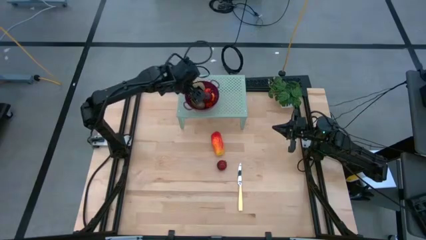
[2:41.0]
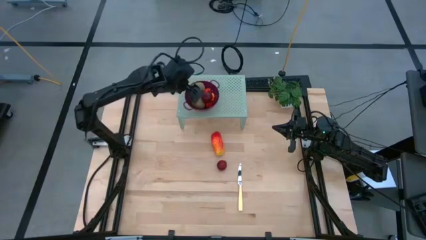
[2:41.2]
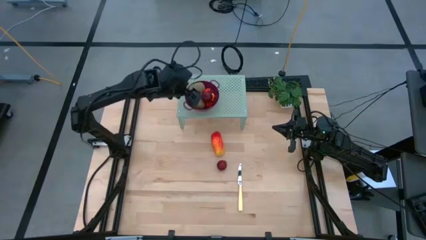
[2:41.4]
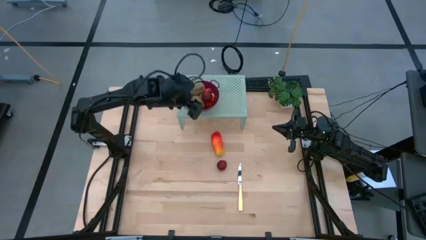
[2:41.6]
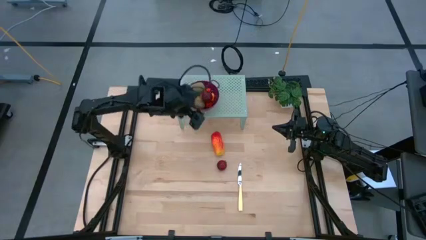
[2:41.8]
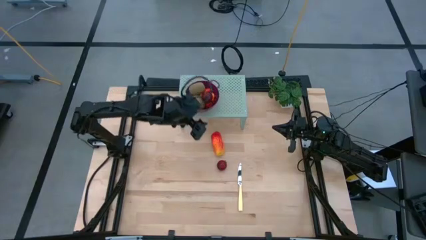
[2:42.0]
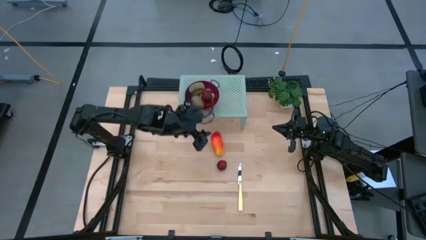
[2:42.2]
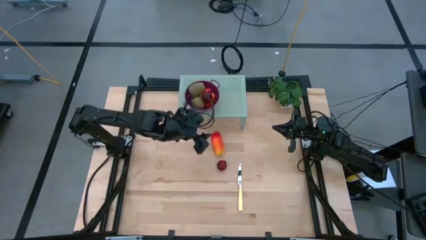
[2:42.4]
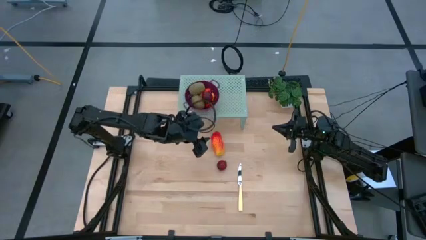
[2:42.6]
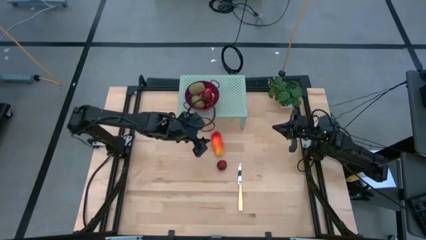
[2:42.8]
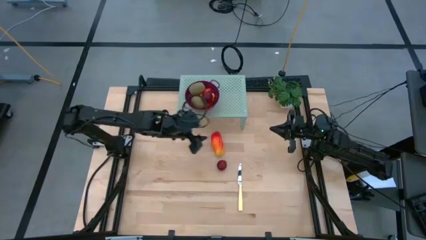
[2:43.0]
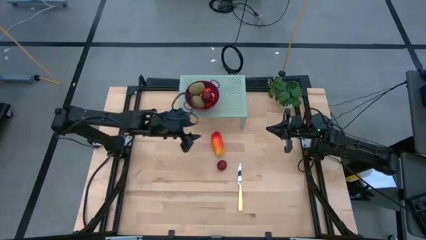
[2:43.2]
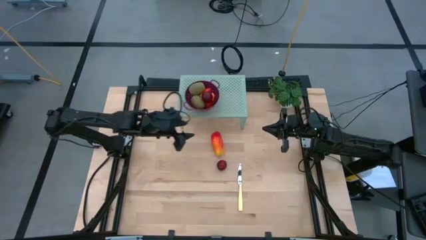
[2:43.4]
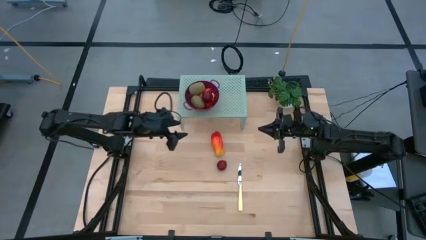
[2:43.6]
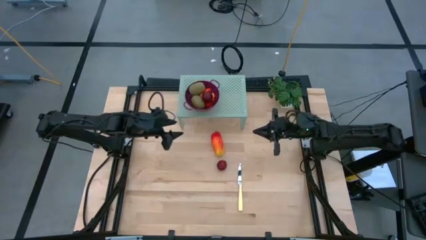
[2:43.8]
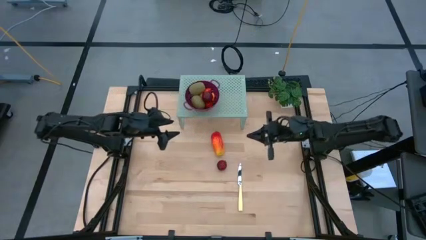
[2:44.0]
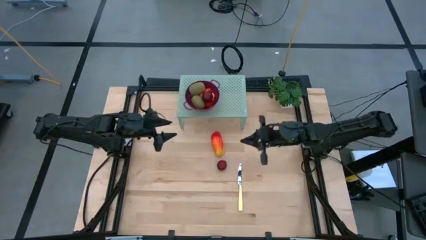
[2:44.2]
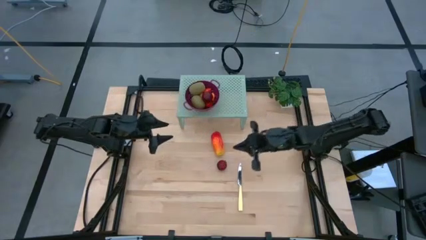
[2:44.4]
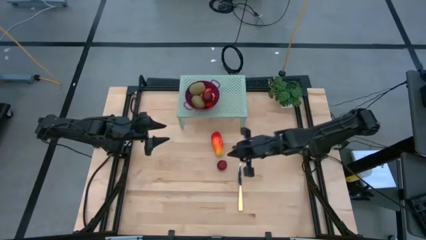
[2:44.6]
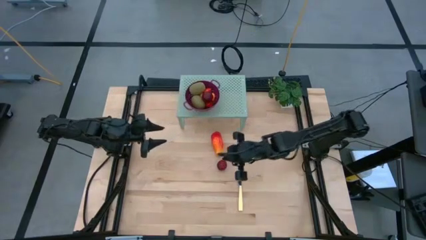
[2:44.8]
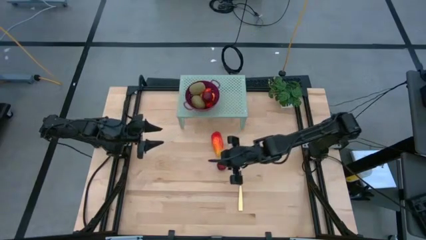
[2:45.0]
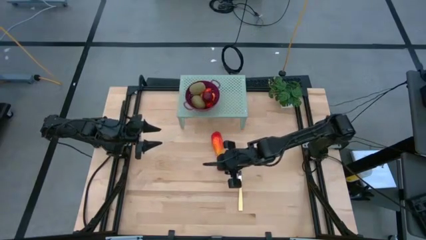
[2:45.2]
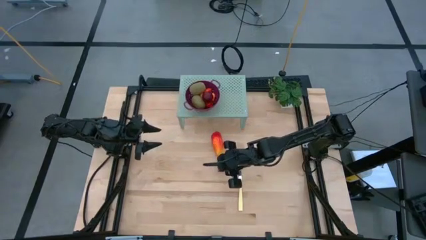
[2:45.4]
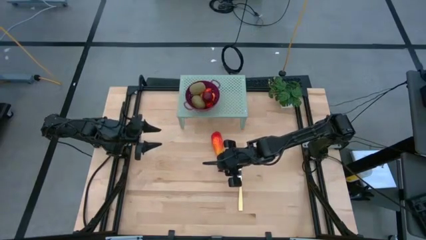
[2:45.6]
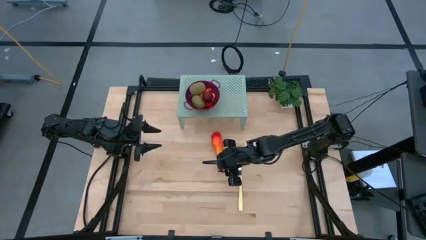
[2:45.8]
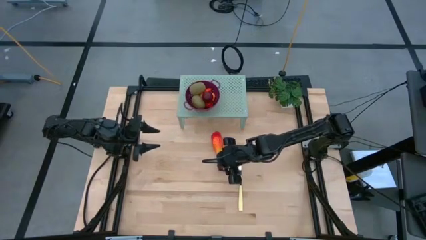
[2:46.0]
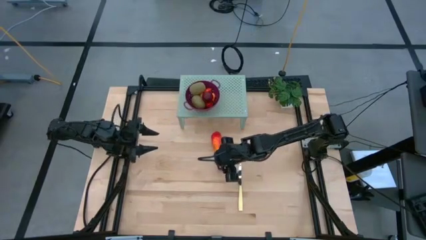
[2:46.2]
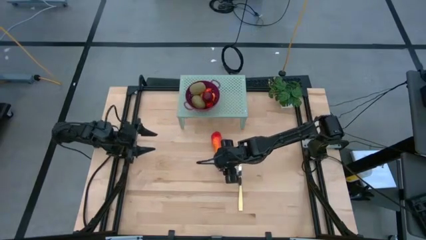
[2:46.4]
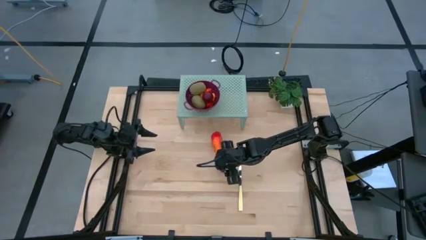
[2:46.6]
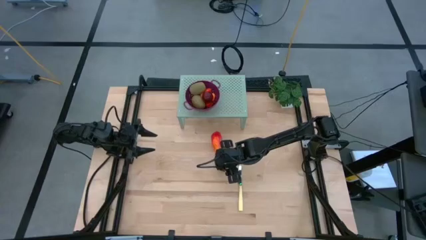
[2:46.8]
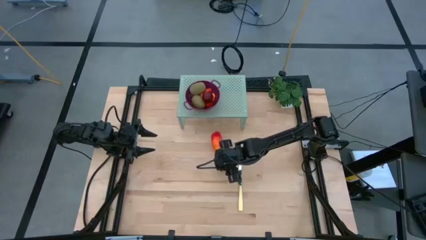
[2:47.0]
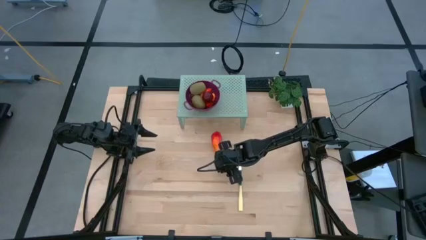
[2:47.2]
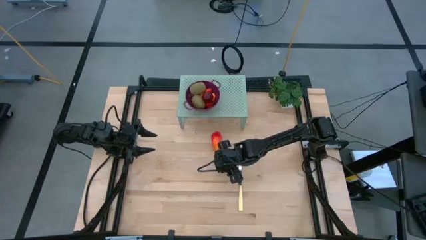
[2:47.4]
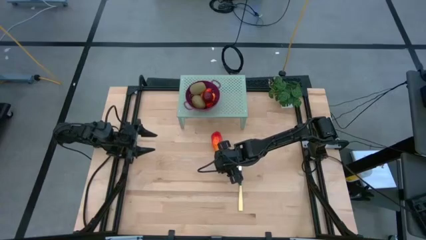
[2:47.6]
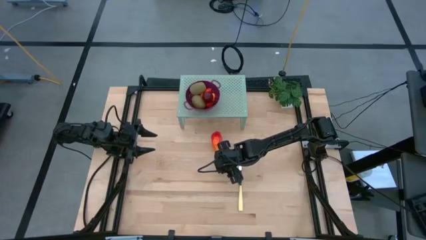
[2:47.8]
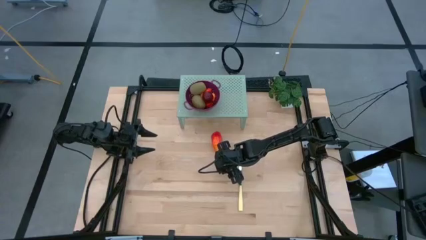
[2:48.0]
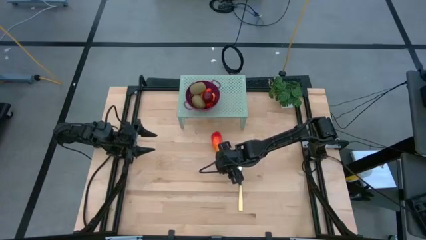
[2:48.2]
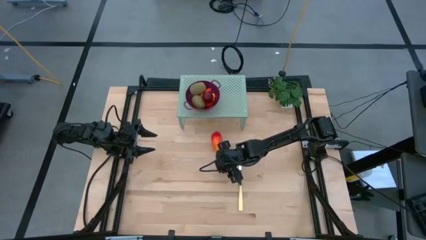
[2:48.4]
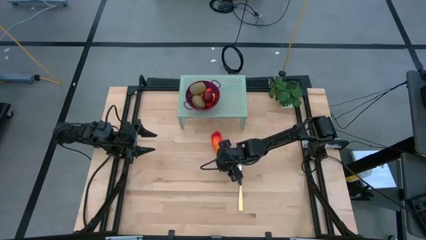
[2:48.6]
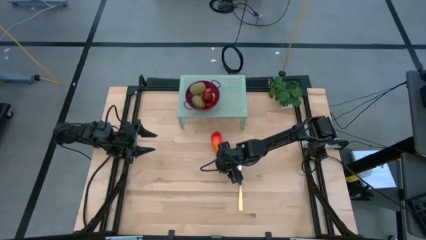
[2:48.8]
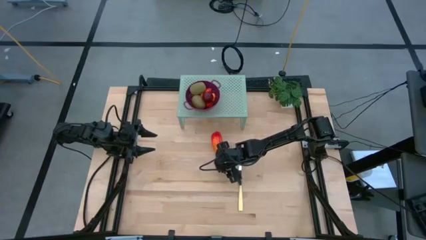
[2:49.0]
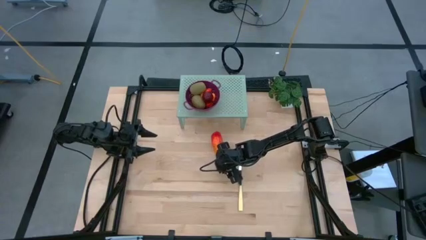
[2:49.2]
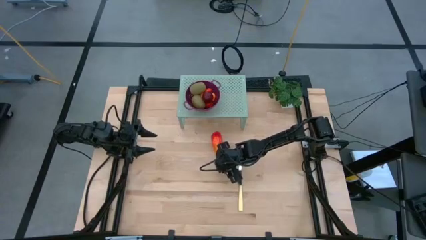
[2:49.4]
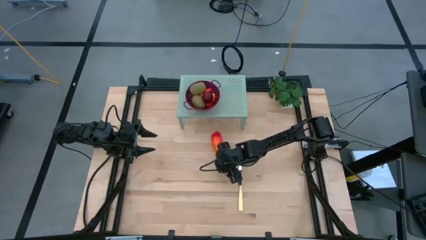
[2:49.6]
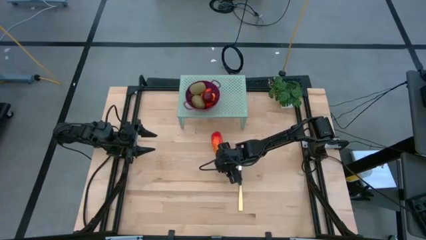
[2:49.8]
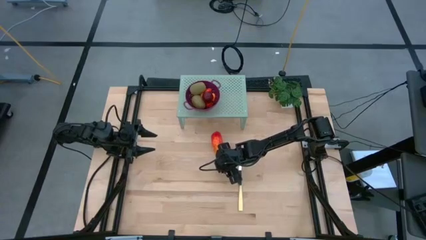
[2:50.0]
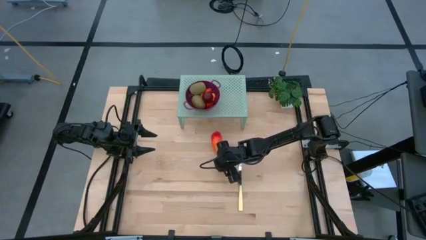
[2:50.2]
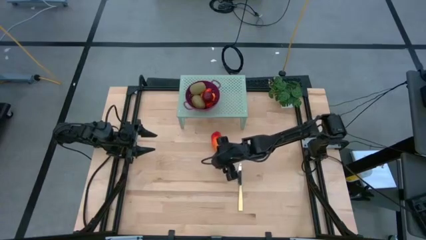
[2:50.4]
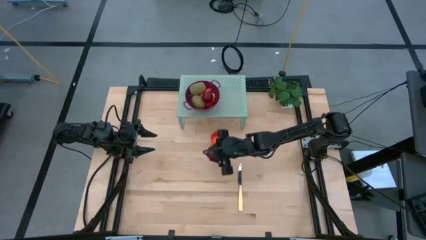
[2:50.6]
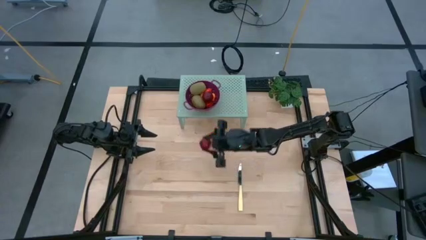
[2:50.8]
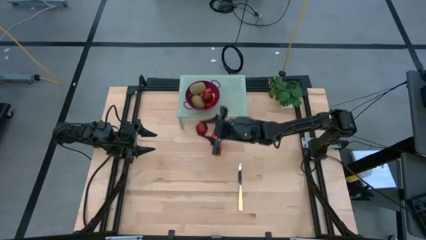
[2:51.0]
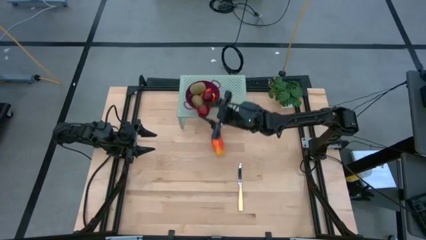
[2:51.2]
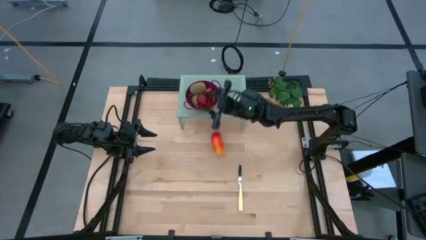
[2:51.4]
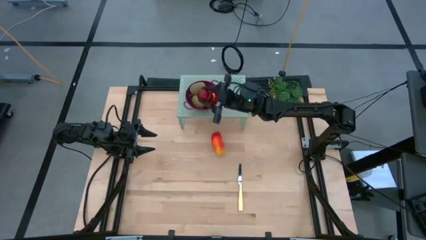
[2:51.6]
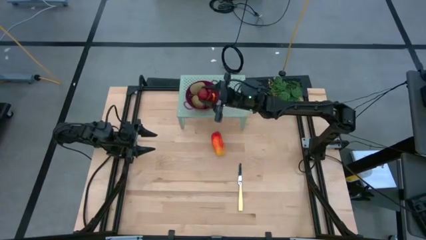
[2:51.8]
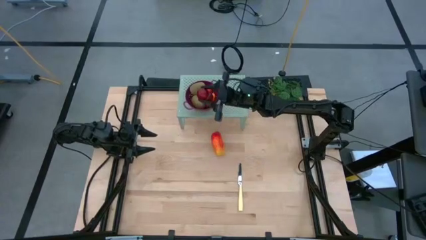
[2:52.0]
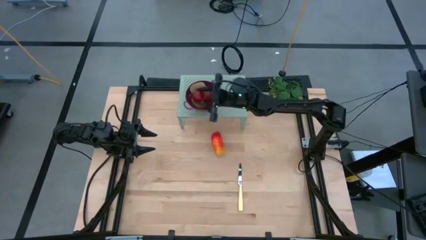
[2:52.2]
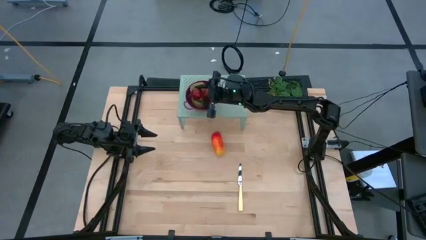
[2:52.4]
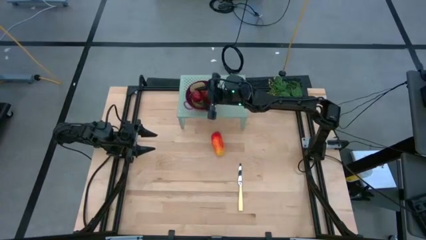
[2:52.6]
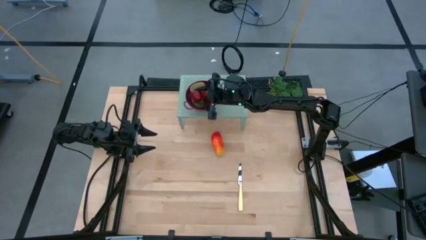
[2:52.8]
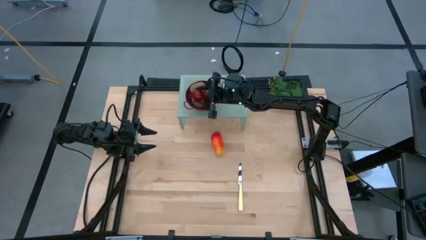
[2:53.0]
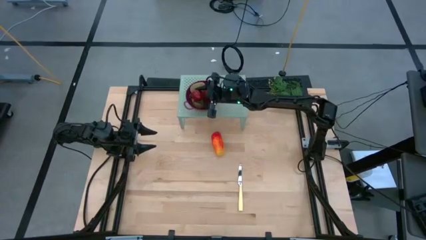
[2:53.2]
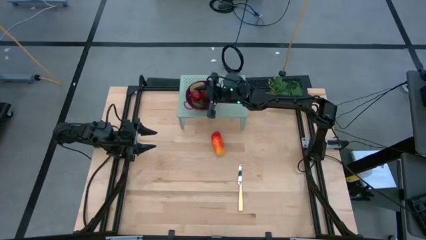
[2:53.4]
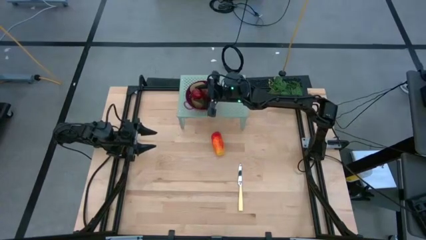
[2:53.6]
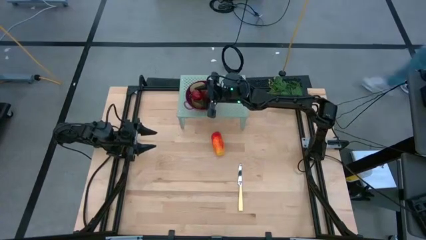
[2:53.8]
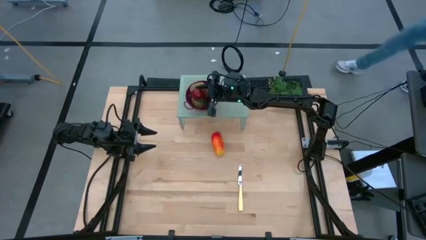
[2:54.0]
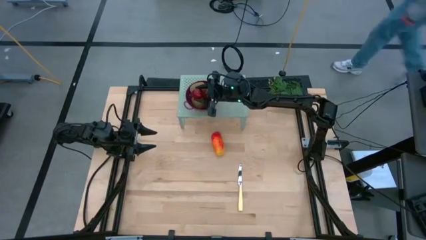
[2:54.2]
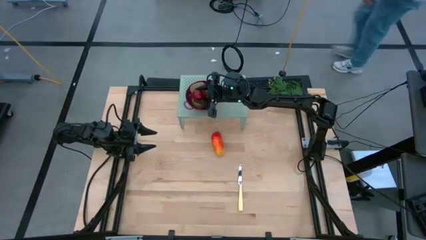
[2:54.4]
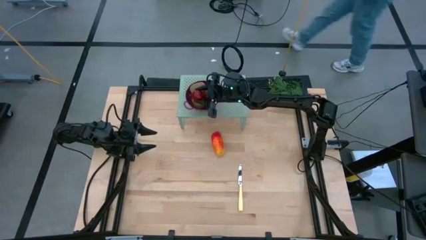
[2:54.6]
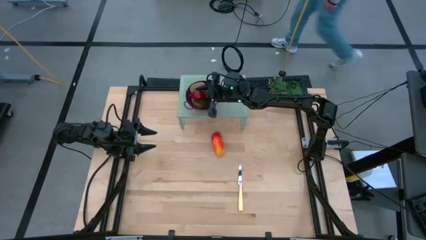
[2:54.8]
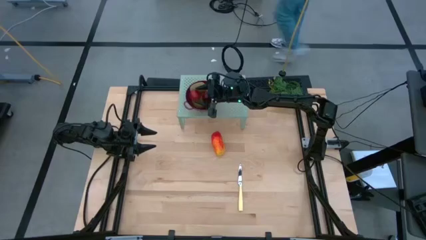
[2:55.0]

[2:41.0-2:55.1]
Task: Pick & Place Fruit
Put the pomegranate into violet strainer bowl on the shelf
